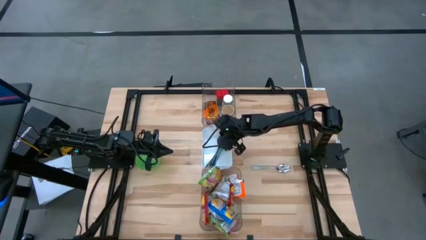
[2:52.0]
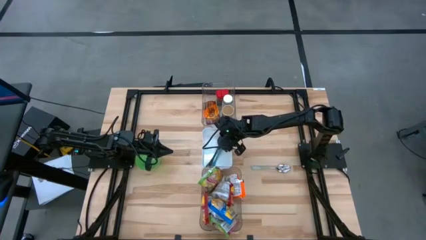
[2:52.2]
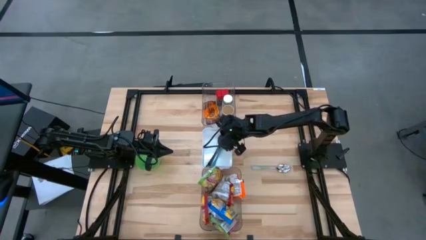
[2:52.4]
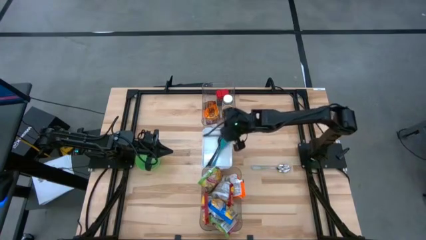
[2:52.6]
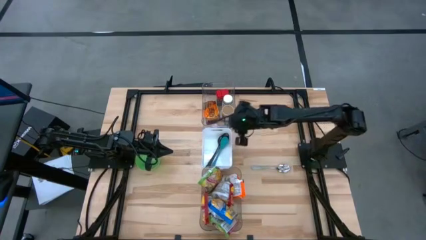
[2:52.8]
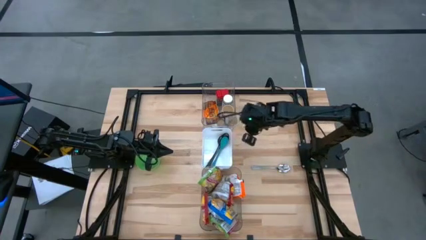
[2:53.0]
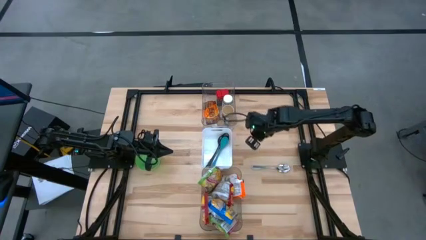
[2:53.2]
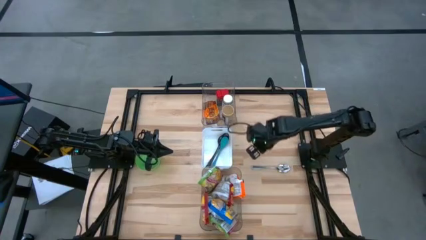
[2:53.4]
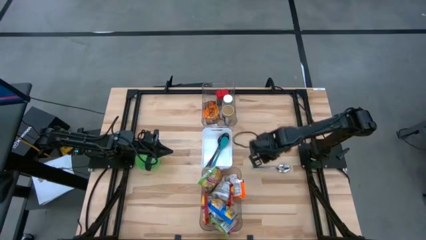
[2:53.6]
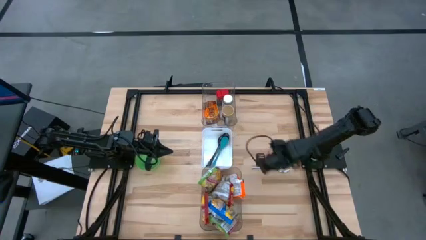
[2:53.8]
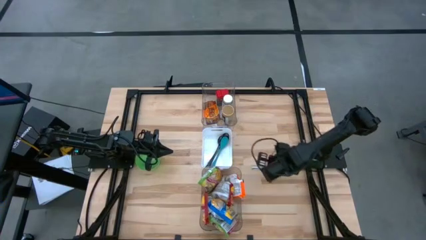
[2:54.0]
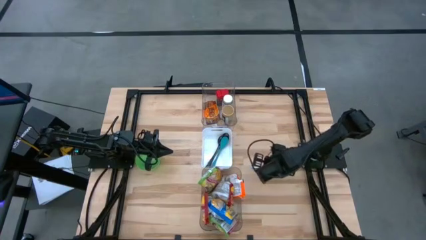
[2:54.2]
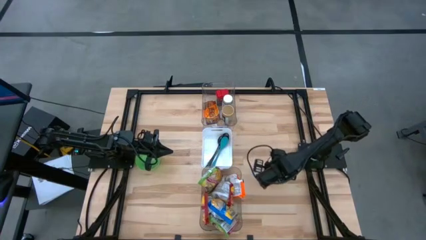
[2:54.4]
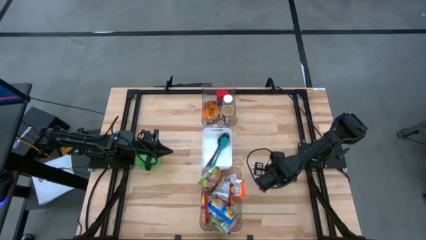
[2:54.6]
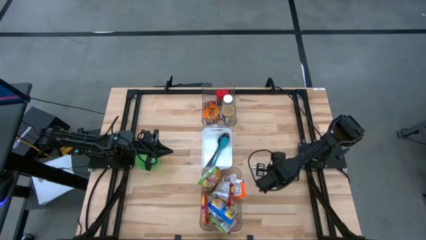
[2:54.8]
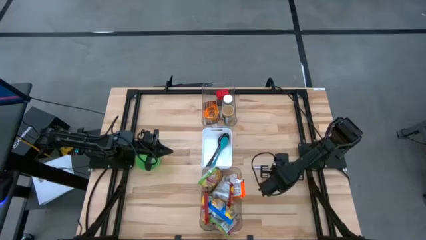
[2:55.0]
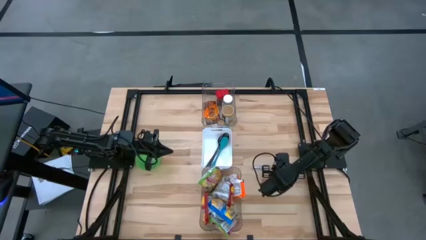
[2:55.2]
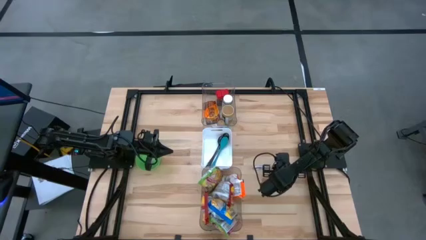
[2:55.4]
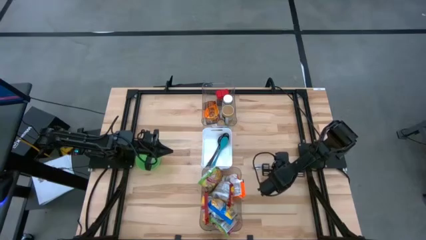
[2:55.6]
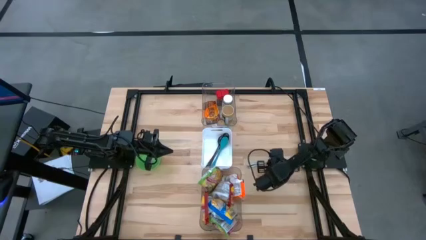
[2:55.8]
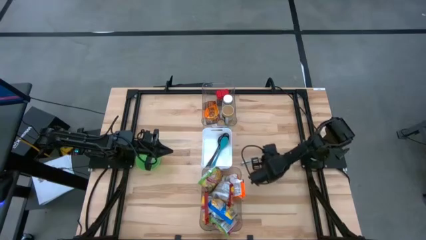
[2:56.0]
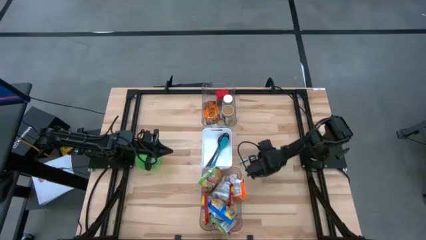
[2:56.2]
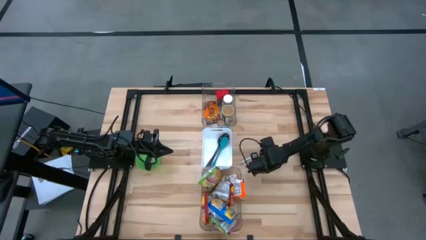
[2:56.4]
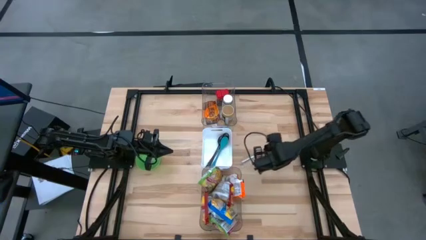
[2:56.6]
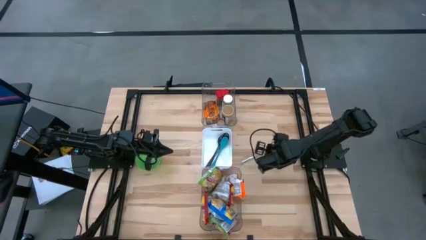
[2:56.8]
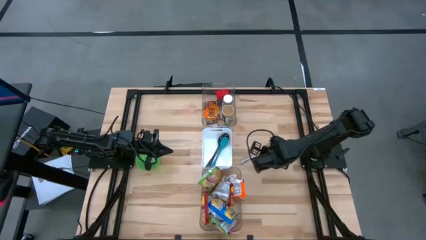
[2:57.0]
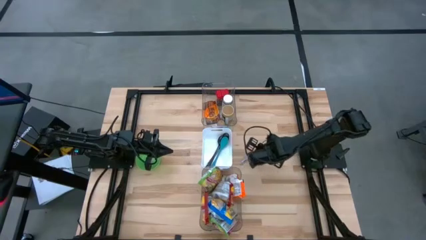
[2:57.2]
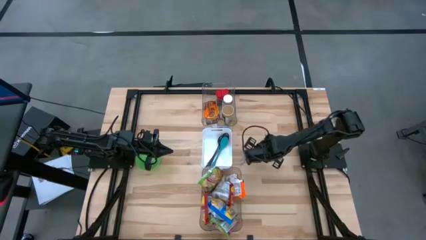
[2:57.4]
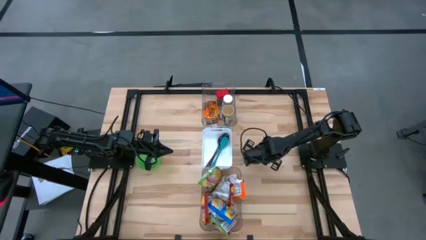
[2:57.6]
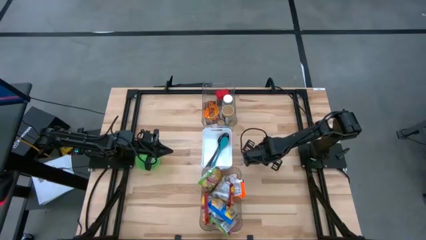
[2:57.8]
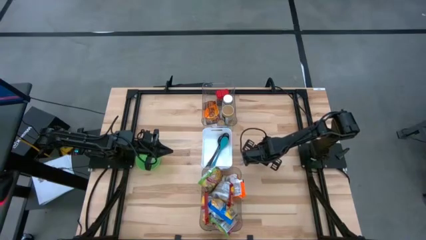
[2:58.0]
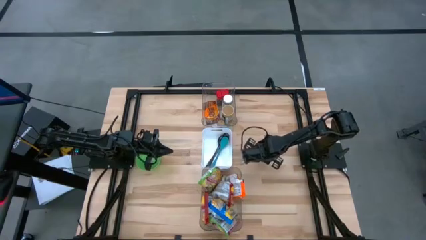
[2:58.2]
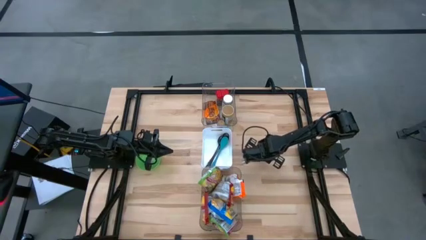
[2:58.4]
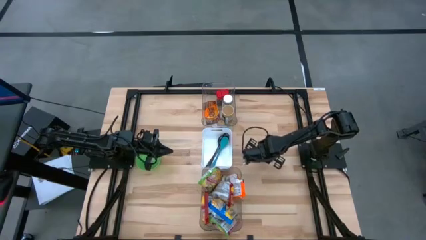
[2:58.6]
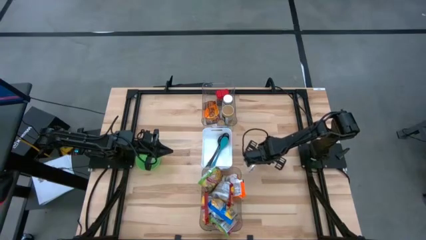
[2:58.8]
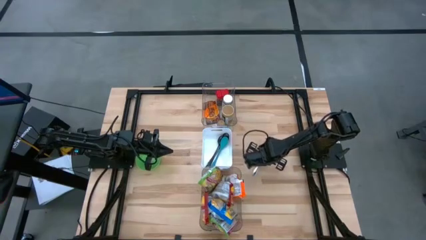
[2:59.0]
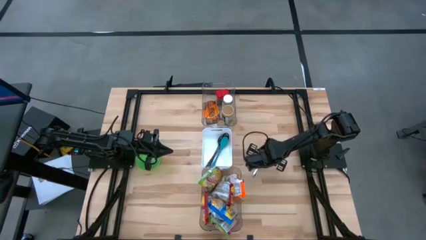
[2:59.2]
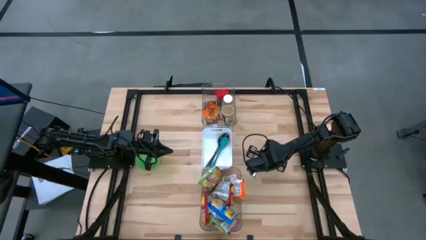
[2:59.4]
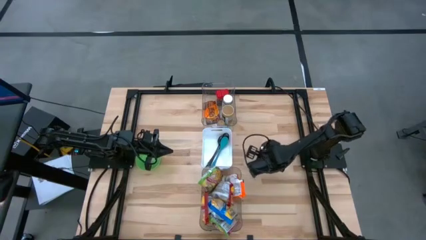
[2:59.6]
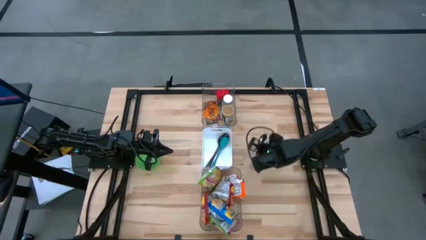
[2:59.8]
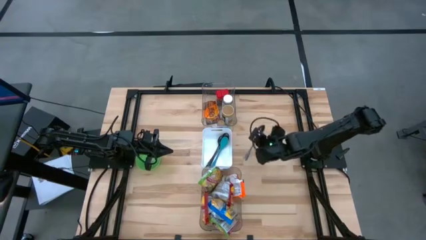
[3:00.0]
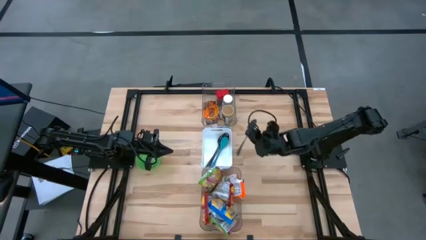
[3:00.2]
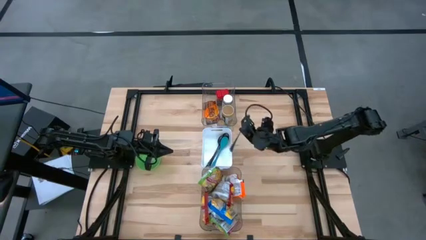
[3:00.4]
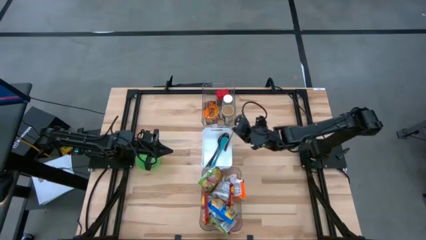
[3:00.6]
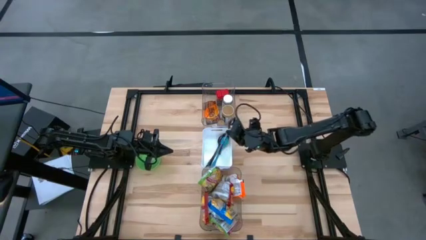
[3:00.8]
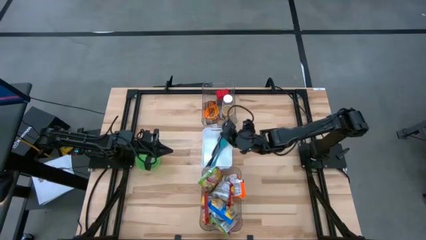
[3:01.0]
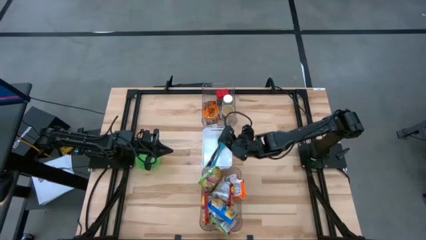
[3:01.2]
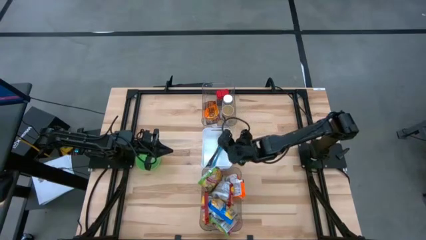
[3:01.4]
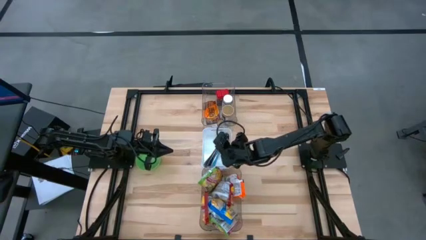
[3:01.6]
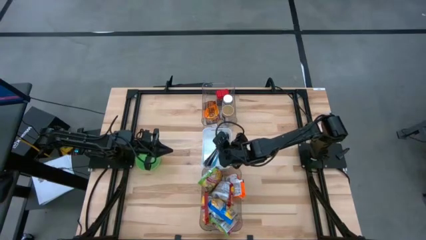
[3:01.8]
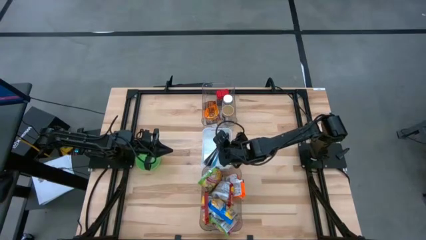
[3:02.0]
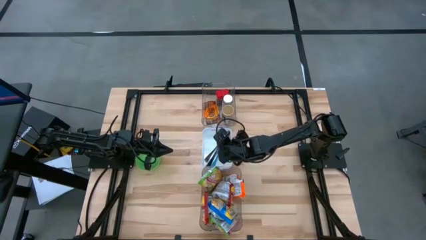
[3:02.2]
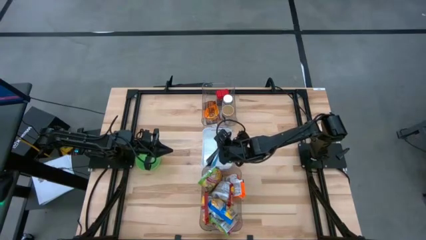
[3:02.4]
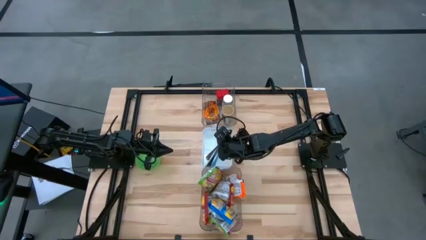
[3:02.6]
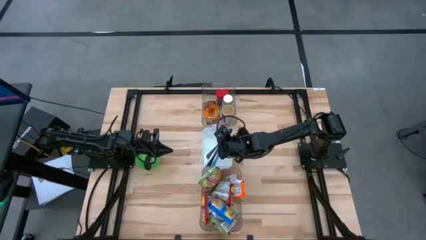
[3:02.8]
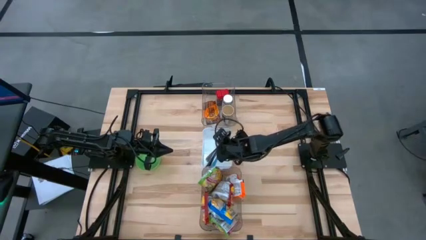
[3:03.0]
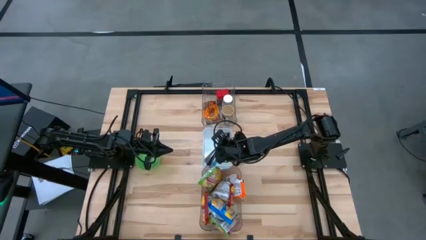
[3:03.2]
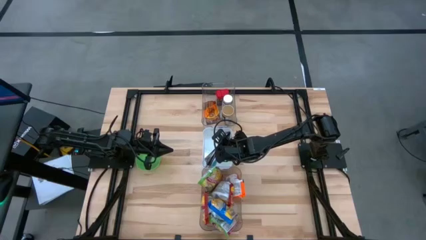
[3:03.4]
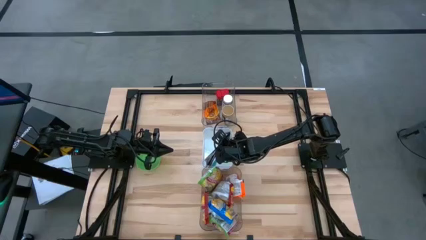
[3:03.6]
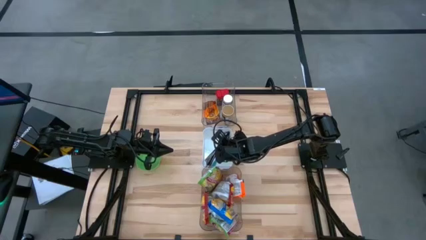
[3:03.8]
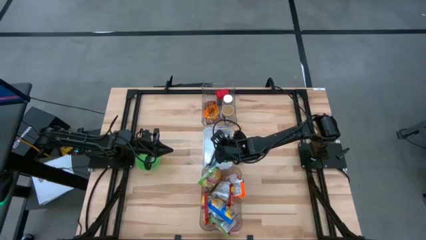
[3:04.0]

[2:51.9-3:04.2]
Task: Pick & Place Food Item
Put the silver spoon into the white bin

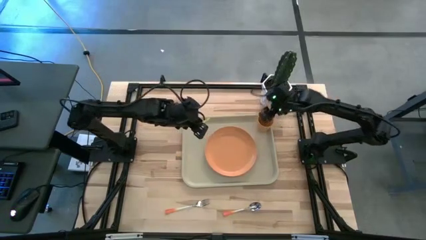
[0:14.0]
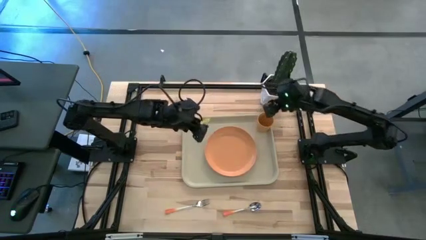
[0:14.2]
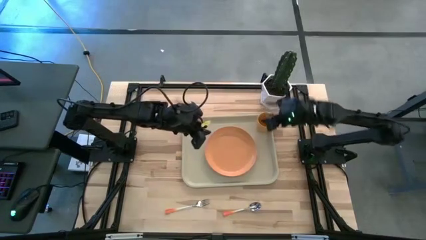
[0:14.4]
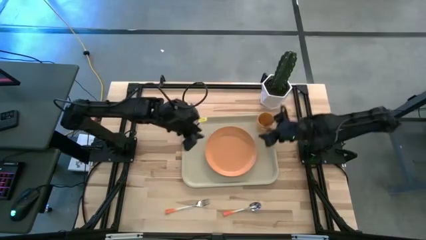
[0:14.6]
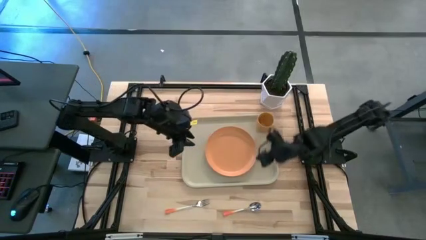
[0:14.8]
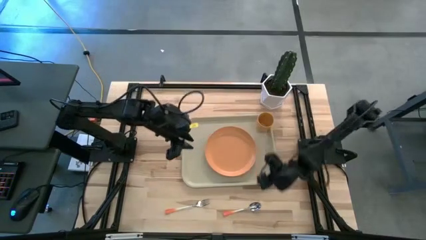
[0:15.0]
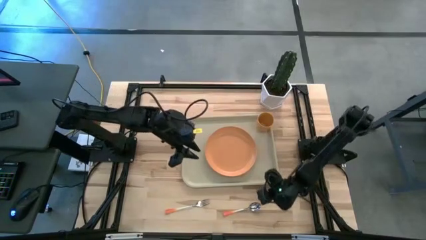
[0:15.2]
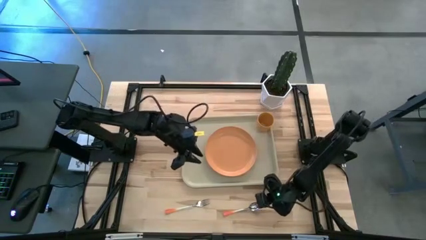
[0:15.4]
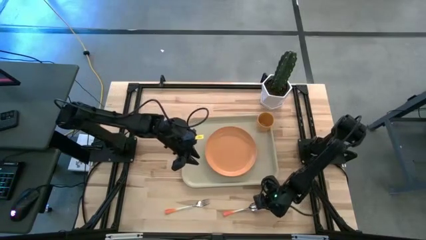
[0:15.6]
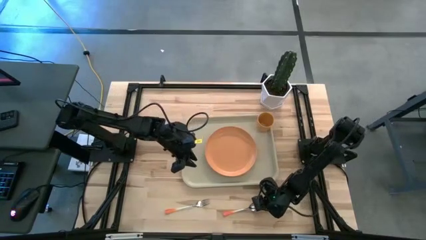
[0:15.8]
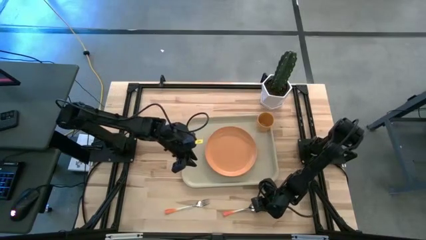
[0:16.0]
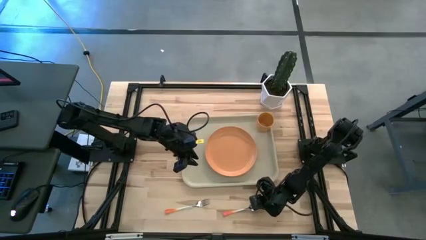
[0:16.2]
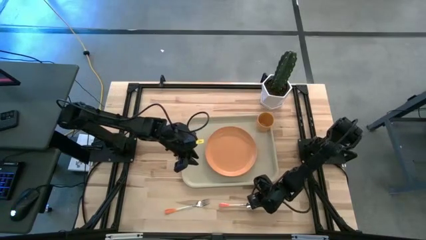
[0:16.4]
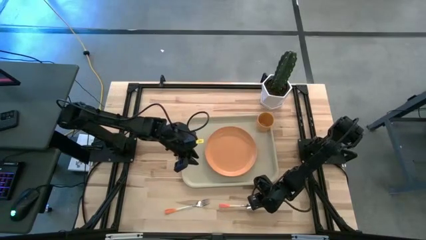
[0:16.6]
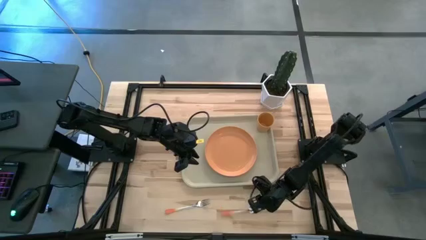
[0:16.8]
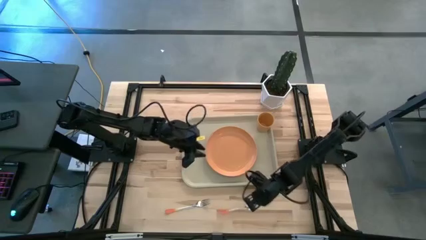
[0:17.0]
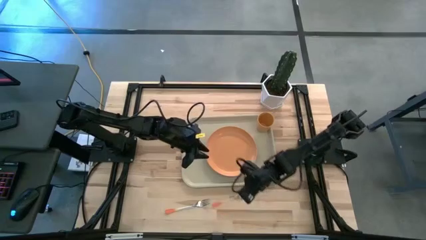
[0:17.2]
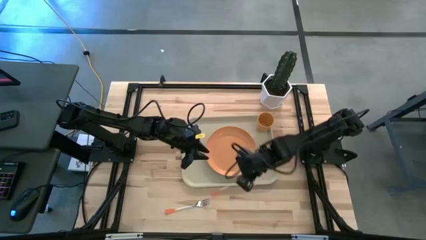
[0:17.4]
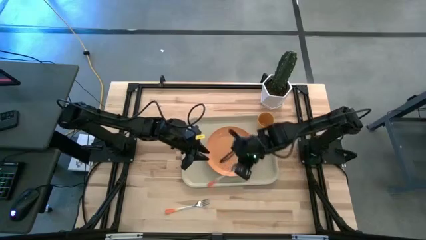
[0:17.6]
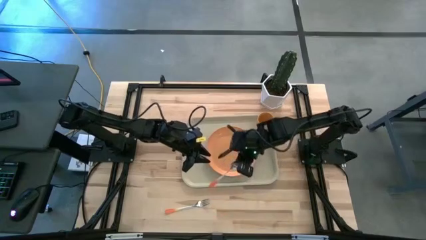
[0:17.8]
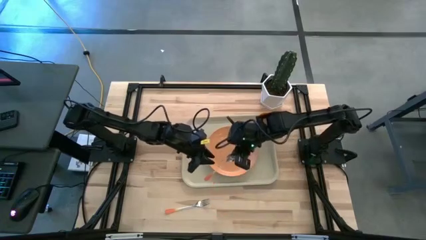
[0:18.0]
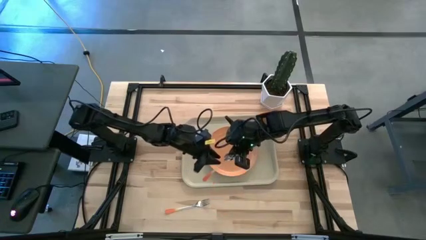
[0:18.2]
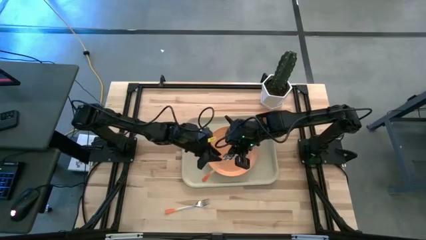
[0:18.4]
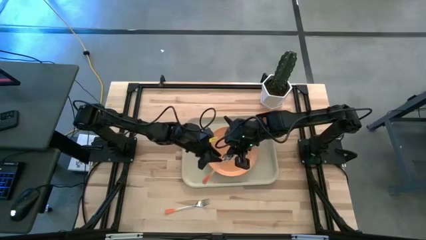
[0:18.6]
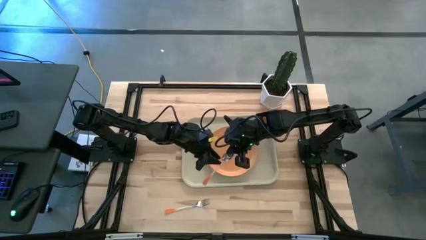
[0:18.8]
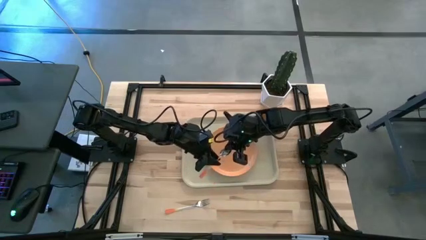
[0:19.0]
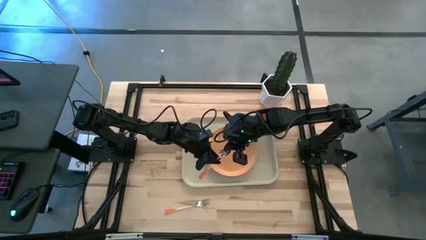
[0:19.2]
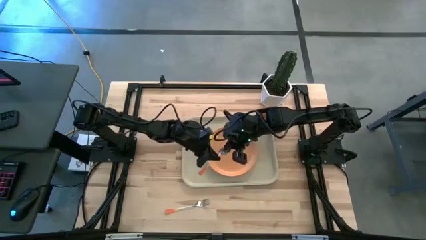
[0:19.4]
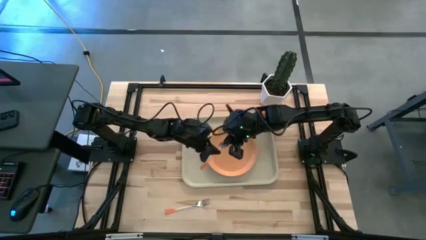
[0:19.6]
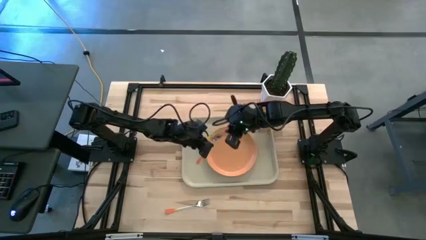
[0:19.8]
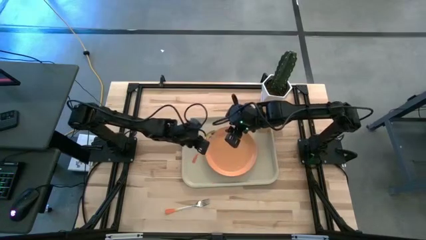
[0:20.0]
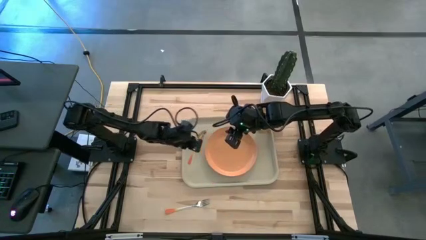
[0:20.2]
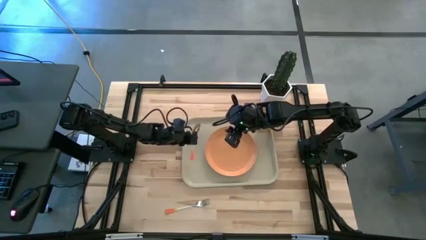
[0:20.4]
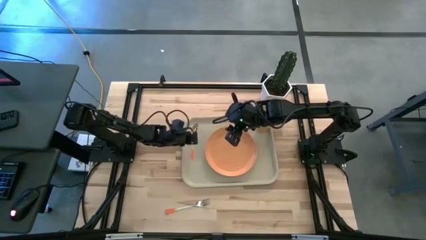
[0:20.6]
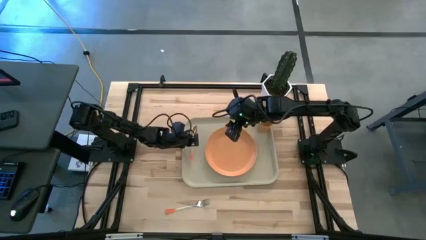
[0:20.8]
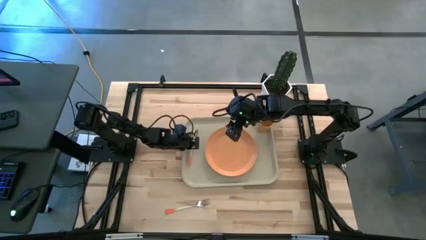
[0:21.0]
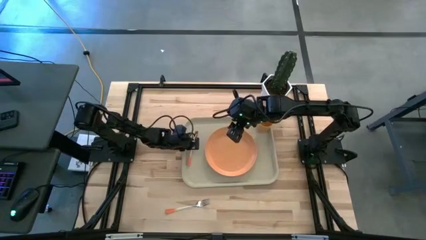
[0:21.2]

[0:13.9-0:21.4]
Task: Pick and place plate/cup/fork/spoon on tray
Put the orange spoon on the brown serving tray to the left of the orange plate
